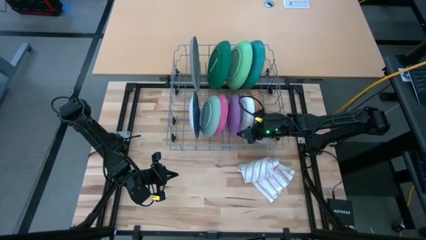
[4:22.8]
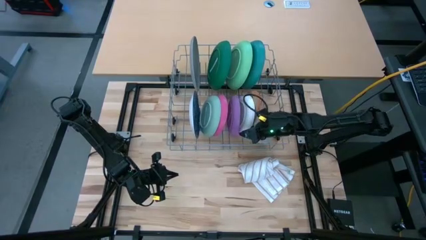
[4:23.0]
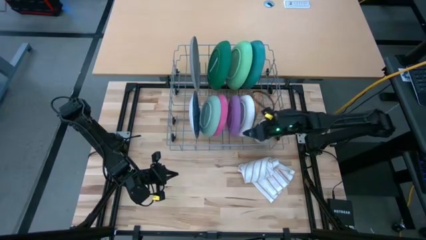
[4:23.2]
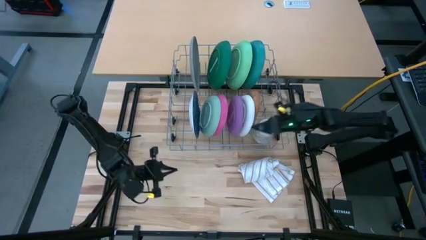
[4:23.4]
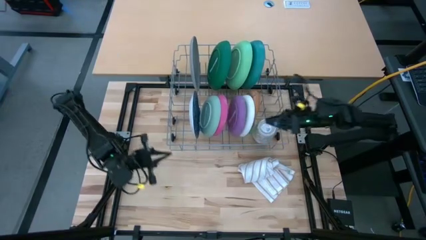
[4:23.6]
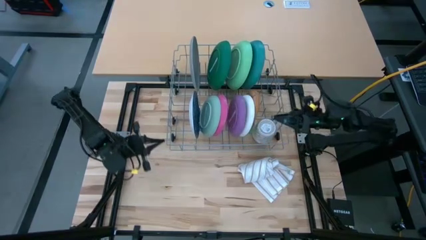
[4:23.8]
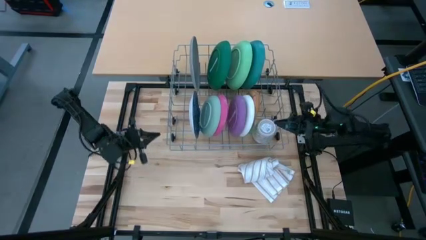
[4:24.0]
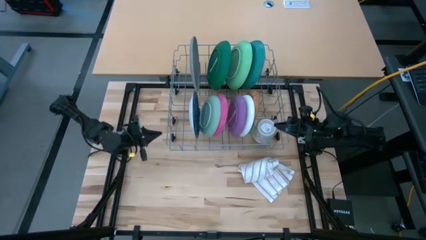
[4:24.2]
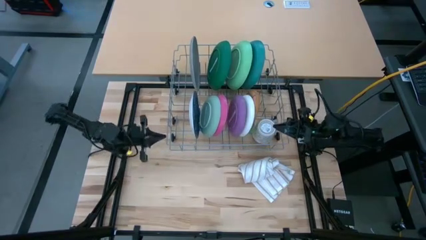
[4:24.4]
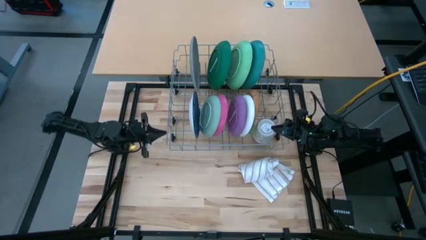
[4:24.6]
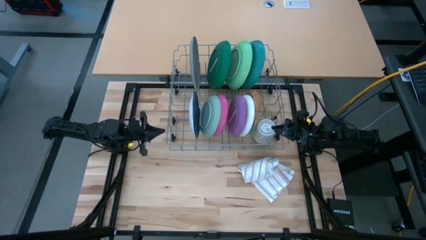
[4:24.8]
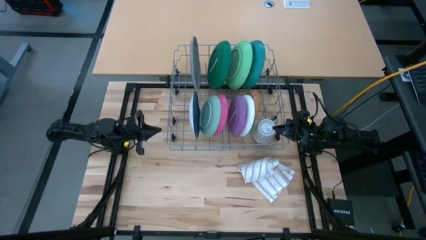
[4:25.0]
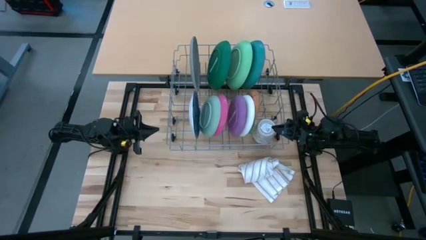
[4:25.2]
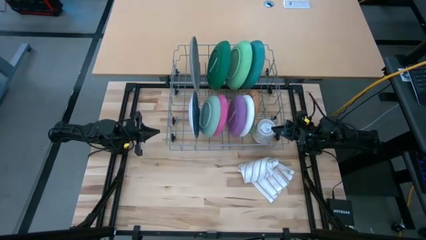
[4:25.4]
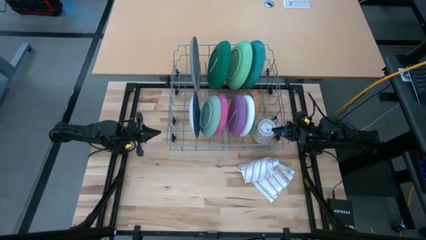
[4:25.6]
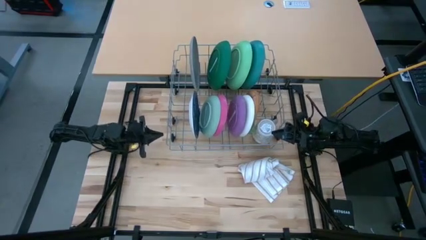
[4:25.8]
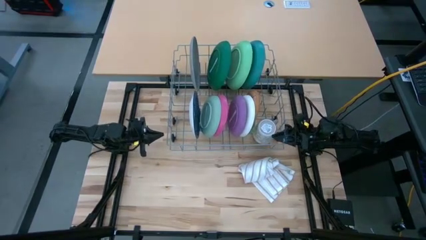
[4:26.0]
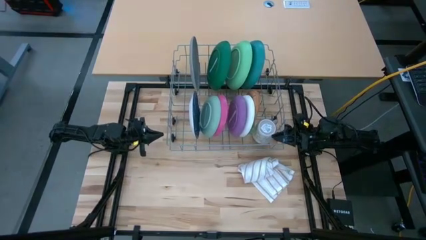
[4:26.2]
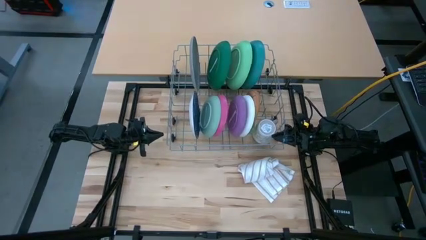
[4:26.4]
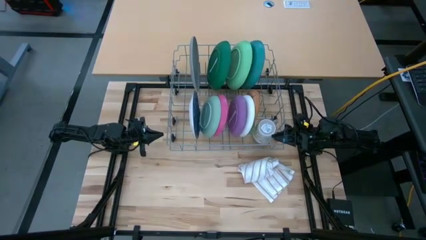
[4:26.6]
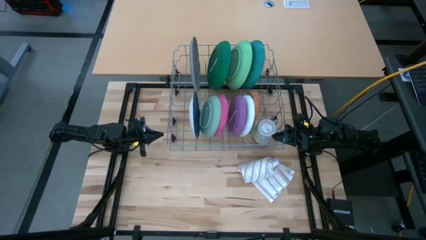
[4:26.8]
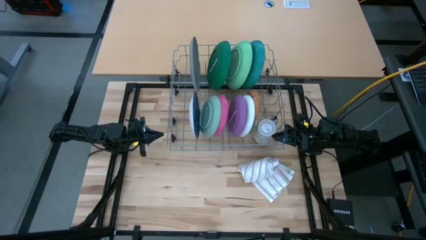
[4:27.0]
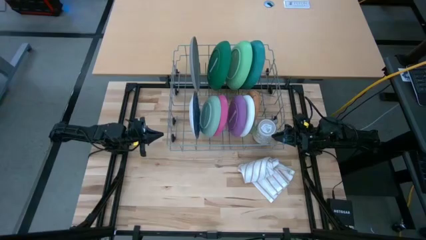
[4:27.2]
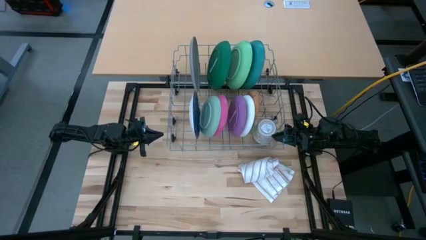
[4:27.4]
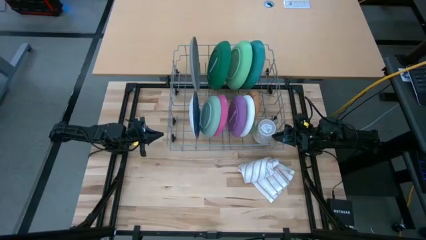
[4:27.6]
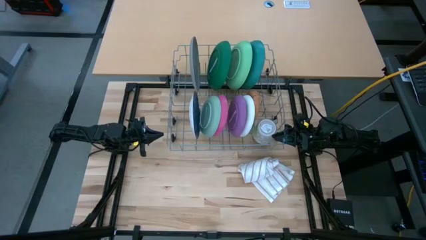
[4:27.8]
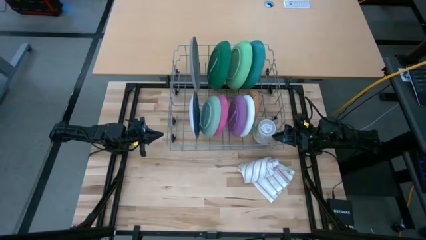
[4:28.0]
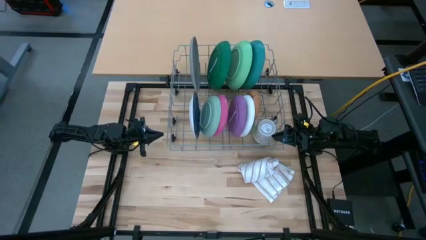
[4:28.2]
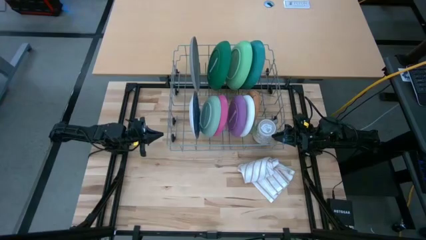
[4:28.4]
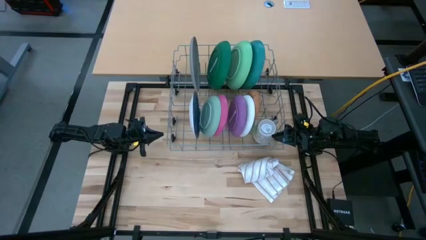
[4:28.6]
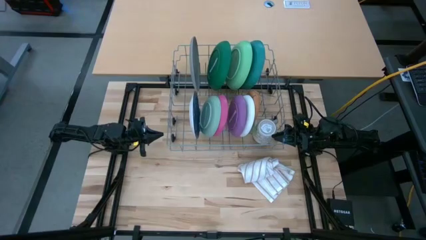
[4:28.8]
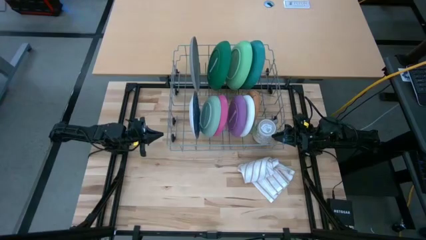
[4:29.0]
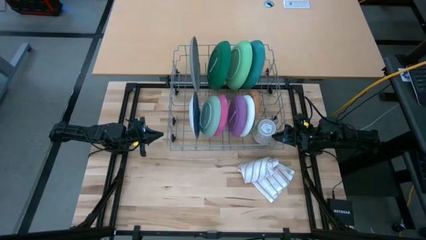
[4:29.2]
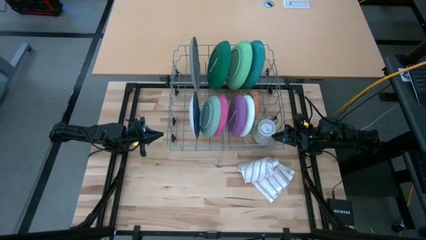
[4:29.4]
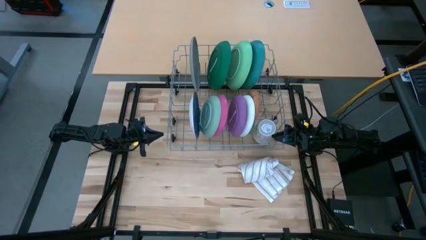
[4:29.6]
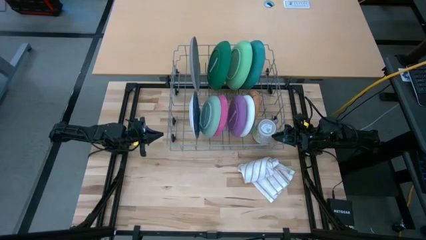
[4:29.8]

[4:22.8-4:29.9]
Task: Sort dishes
Return to Home Position

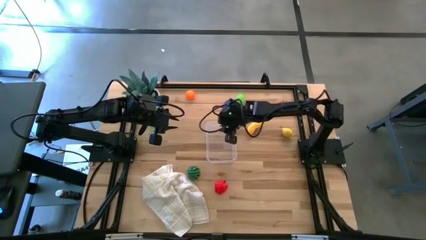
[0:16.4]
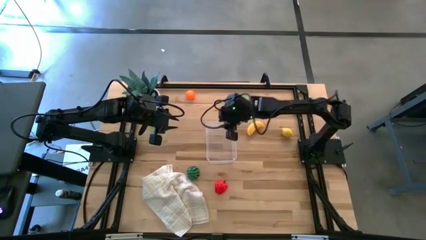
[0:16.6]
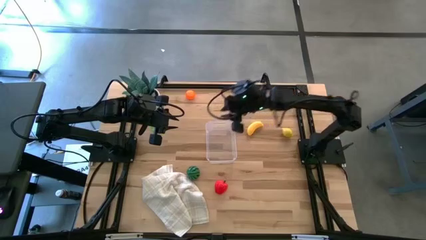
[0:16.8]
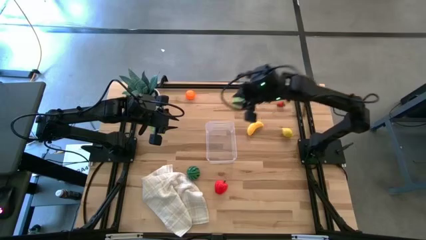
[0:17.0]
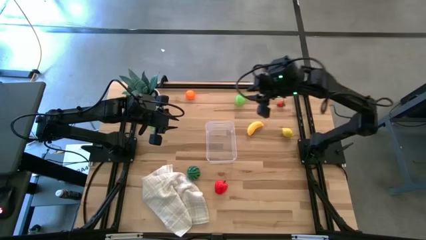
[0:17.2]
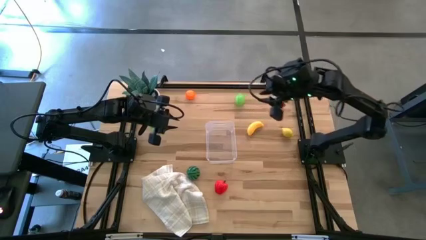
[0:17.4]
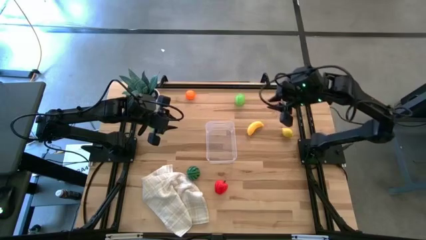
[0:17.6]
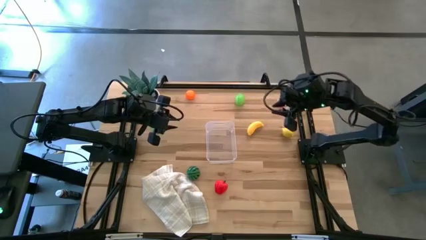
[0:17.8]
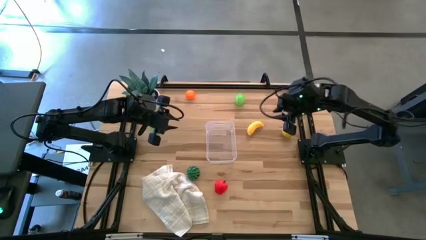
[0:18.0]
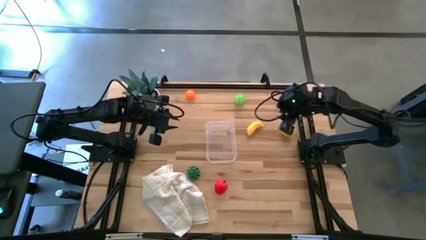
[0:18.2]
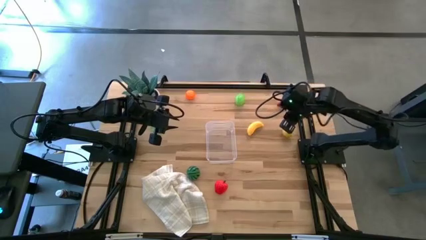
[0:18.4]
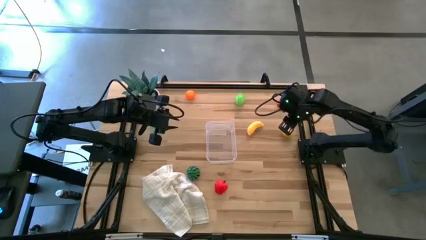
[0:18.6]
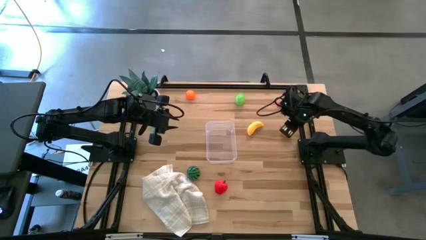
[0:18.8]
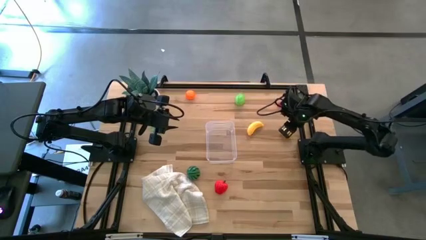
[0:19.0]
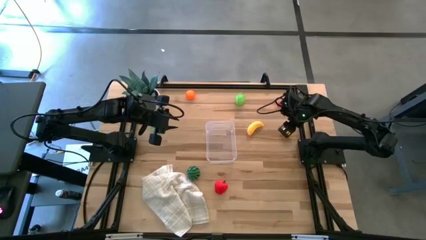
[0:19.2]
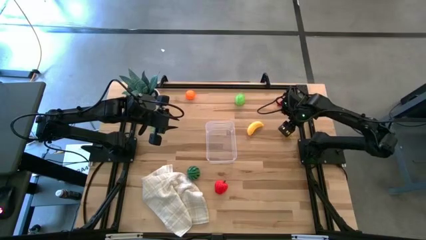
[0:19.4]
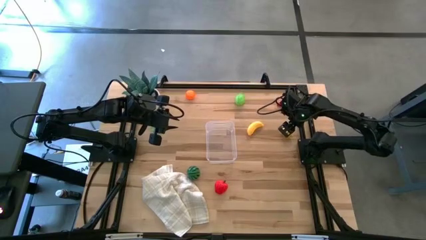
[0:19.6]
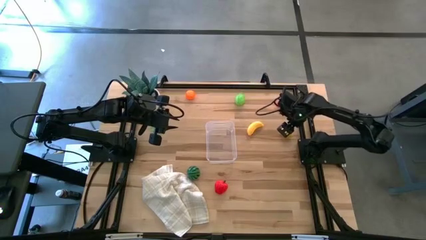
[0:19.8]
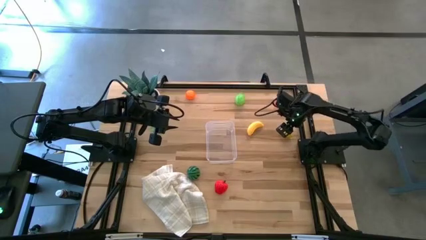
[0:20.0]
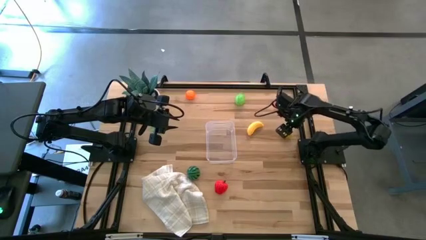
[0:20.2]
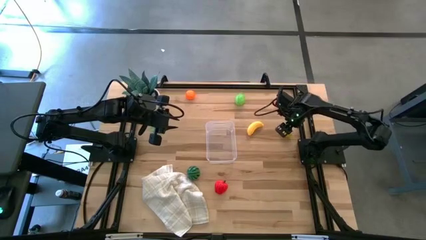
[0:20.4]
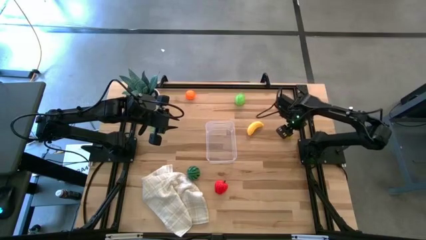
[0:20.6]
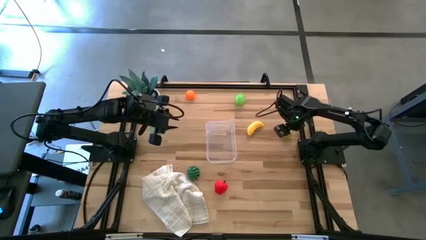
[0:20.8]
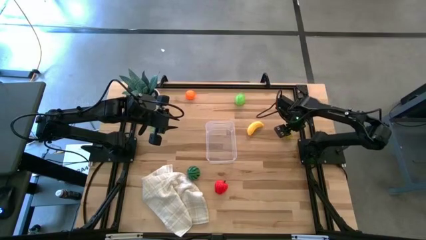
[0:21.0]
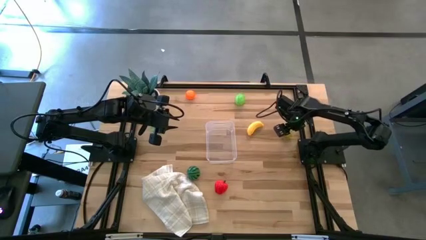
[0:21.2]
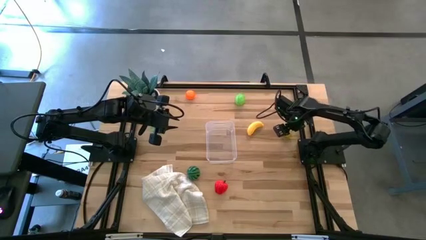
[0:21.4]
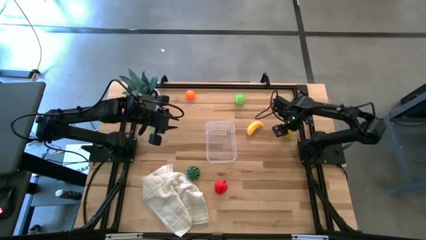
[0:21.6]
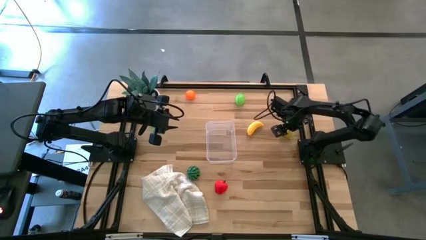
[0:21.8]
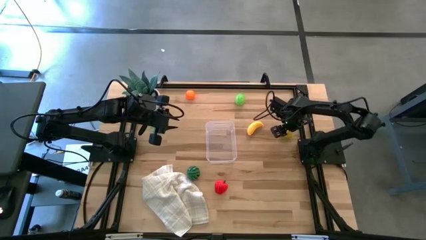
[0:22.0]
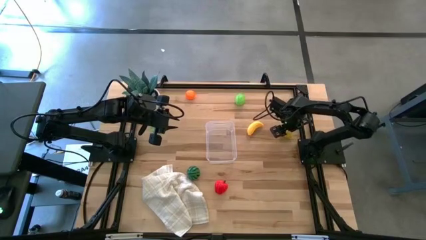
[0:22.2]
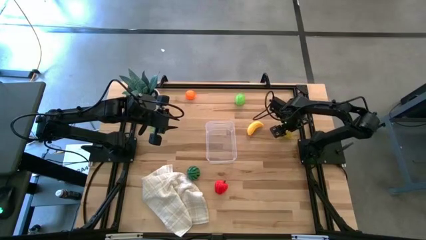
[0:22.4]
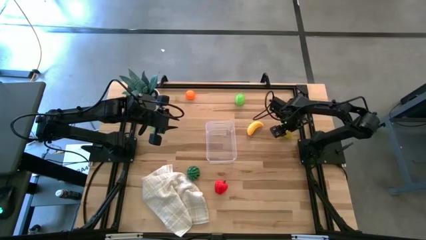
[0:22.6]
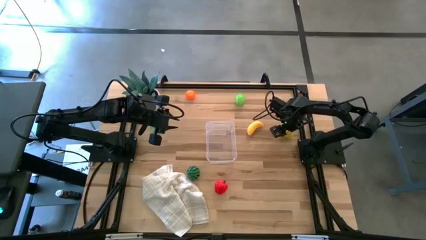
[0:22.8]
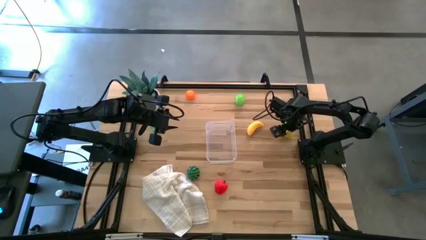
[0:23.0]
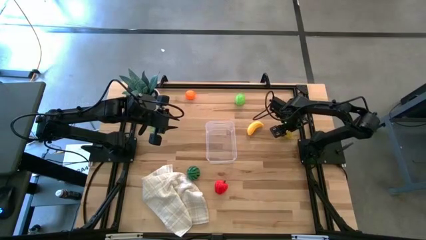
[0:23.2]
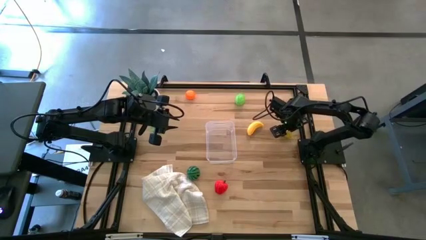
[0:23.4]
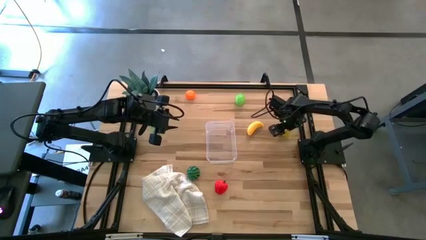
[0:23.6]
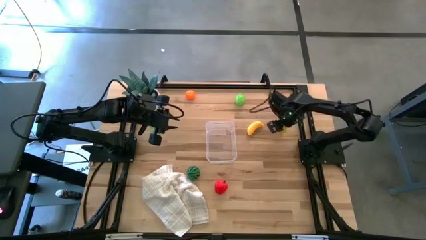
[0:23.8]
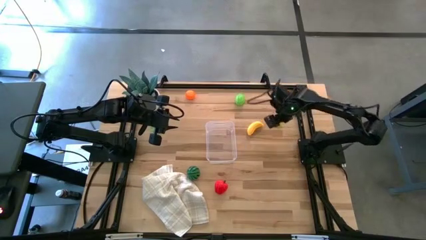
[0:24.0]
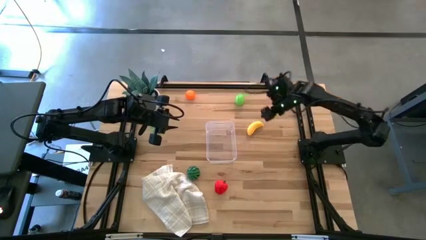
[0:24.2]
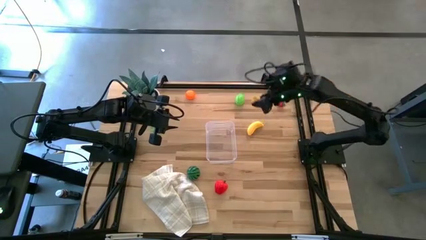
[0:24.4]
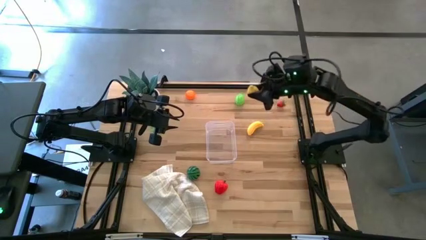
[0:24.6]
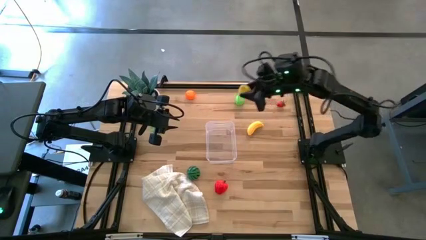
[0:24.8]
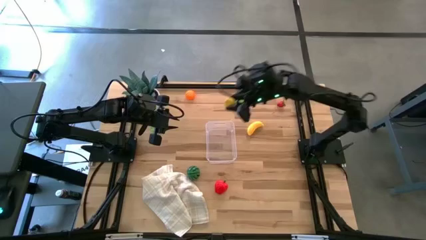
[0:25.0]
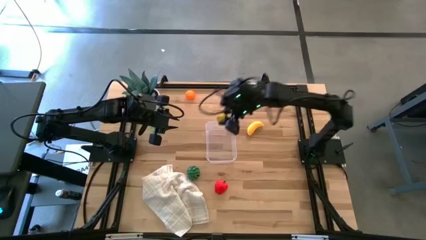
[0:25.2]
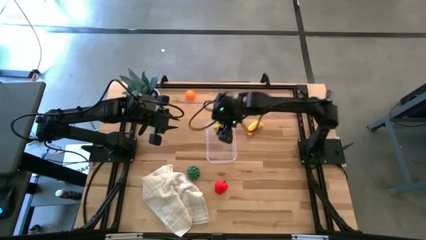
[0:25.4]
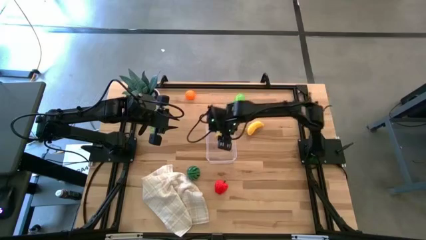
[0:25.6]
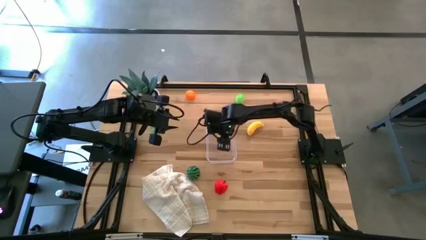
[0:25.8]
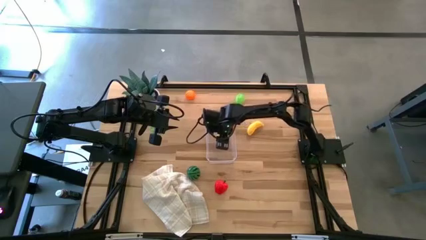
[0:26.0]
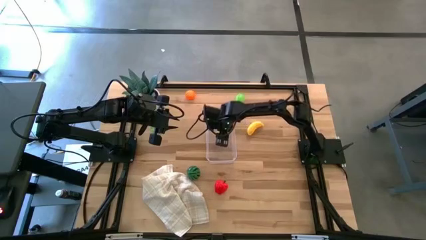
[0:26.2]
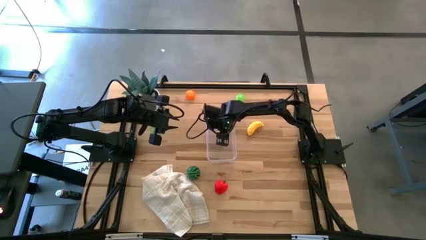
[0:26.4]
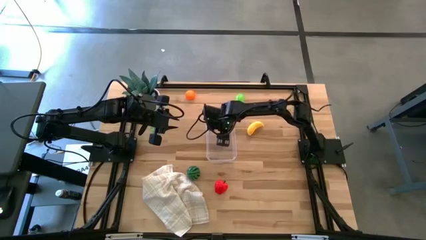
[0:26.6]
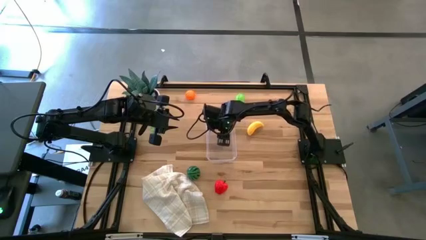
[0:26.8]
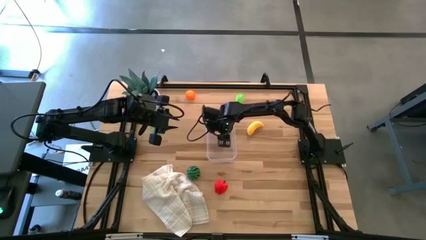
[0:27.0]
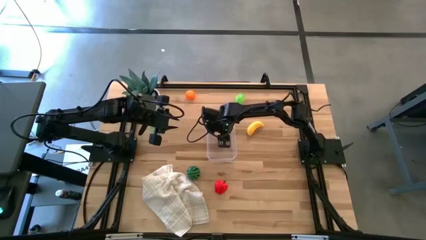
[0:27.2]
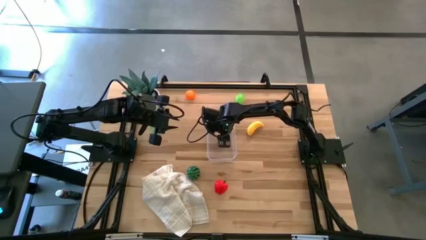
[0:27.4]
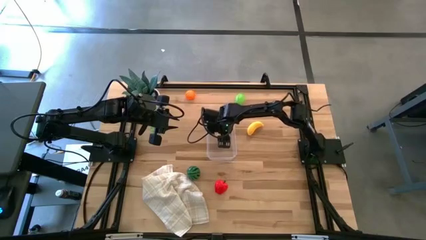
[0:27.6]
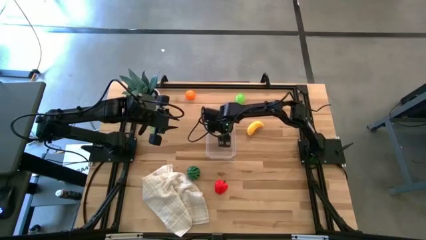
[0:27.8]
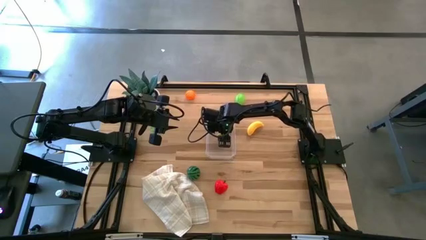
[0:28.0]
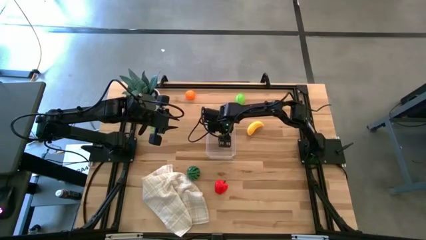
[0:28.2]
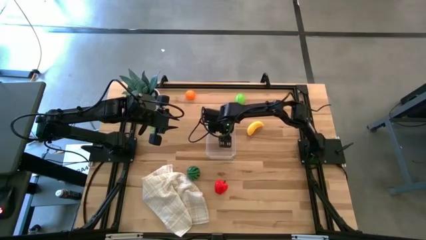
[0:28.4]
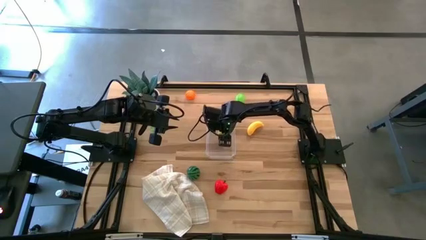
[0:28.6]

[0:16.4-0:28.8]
Task: Pick and placing Produce into tupperware
Put the yellow lemon into the transparent bin
